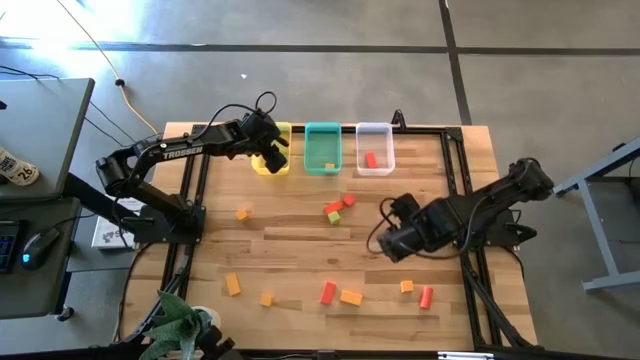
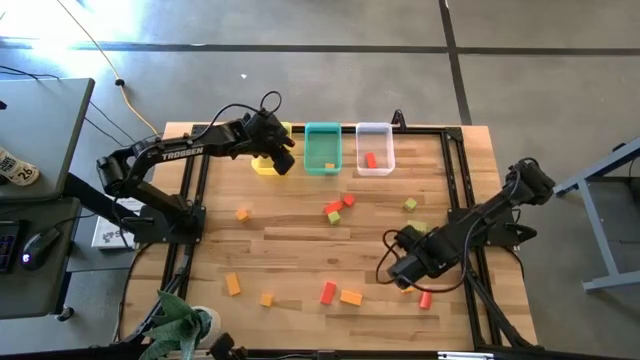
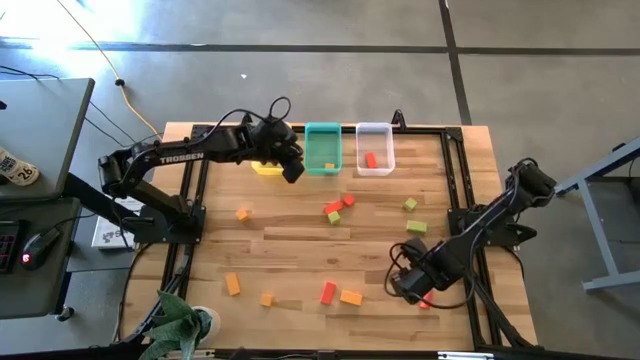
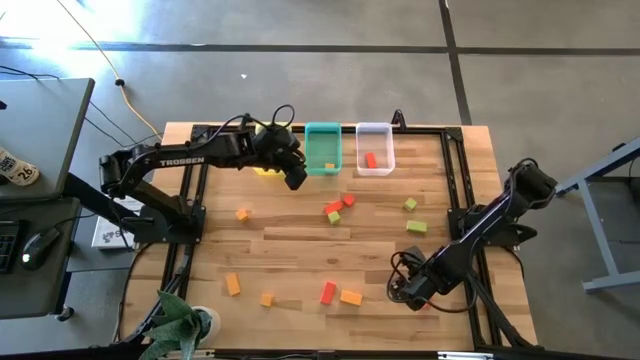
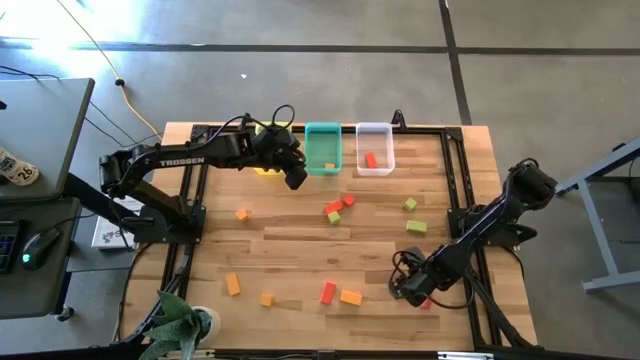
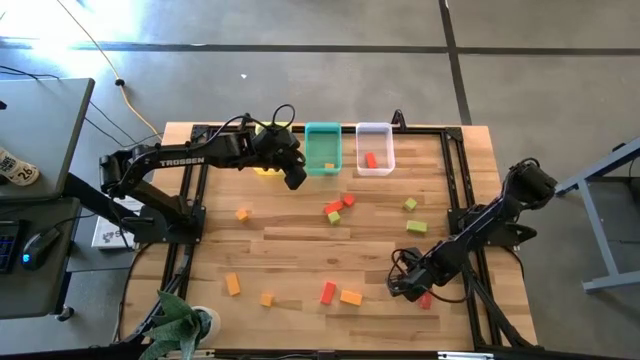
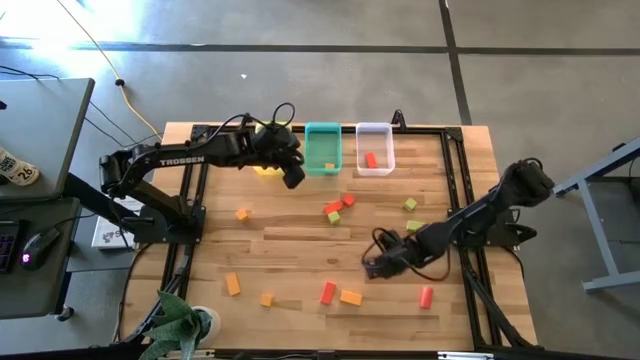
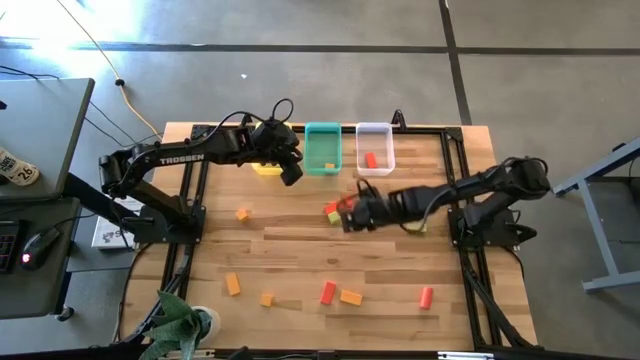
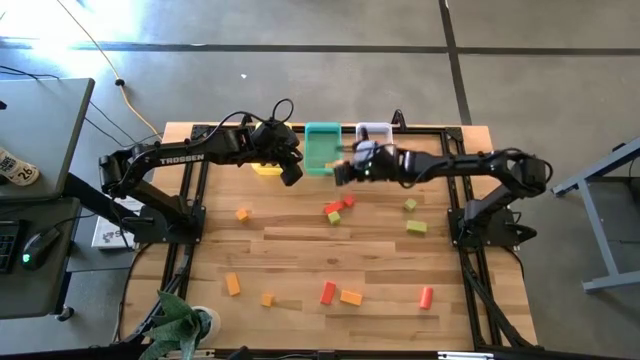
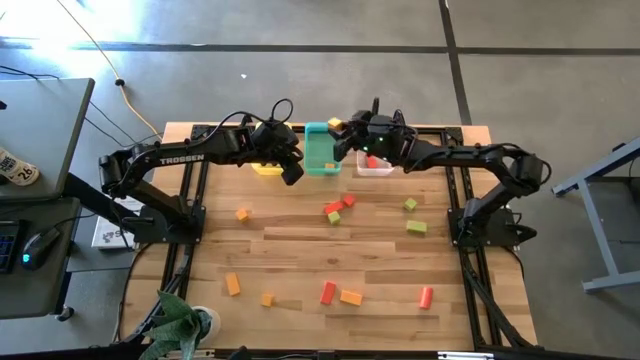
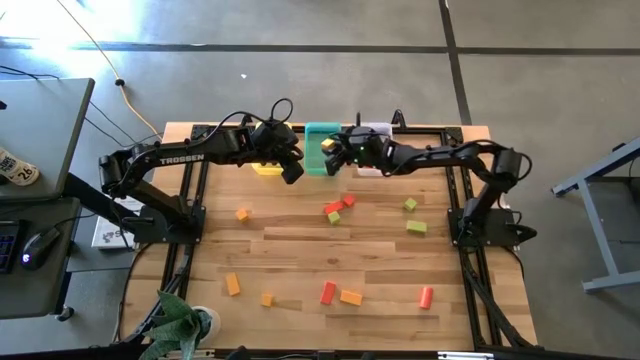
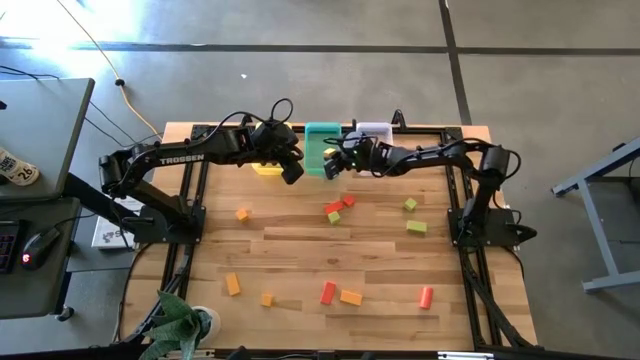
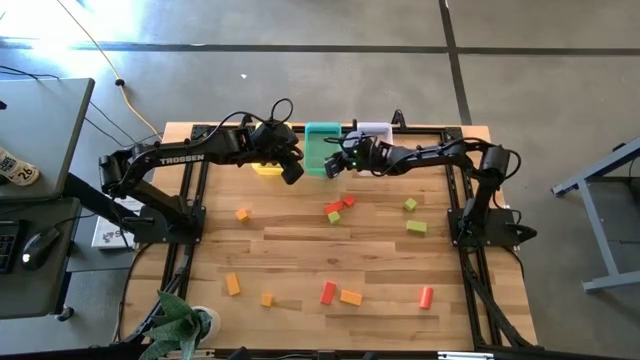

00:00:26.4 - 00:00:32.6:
Task: Sort & place blocks by color
Put the yellow block into the blue bin

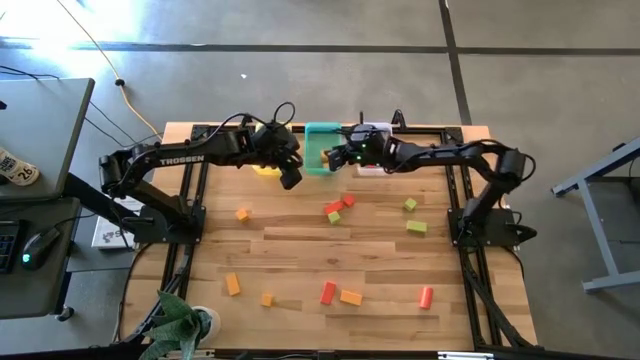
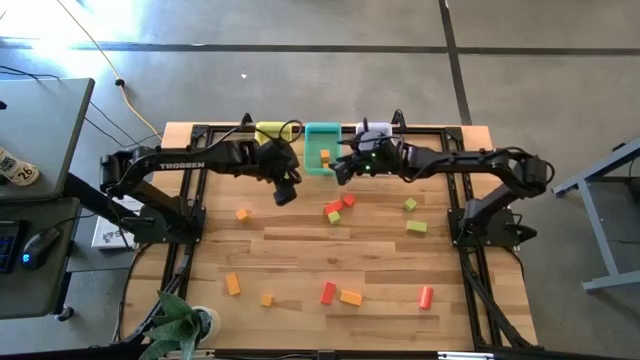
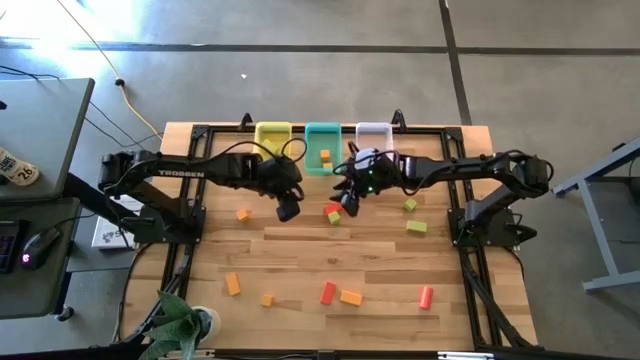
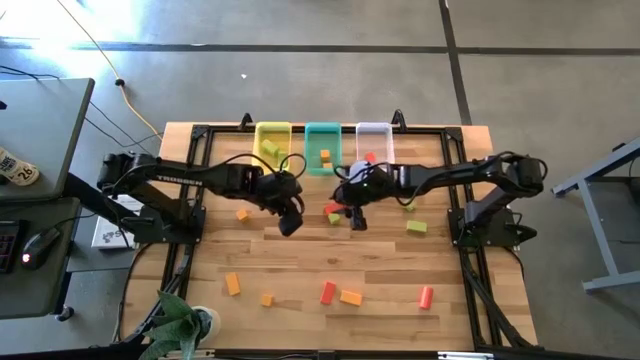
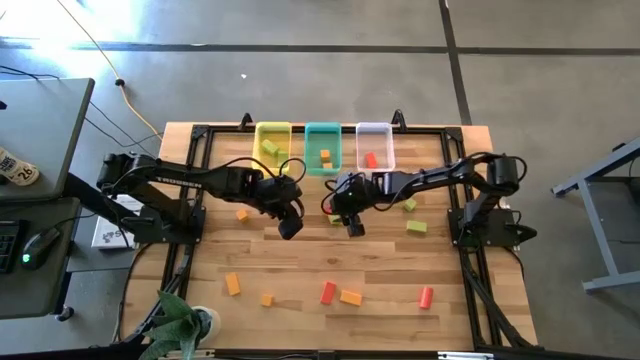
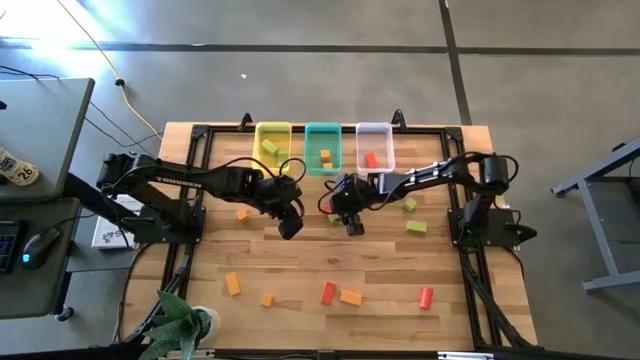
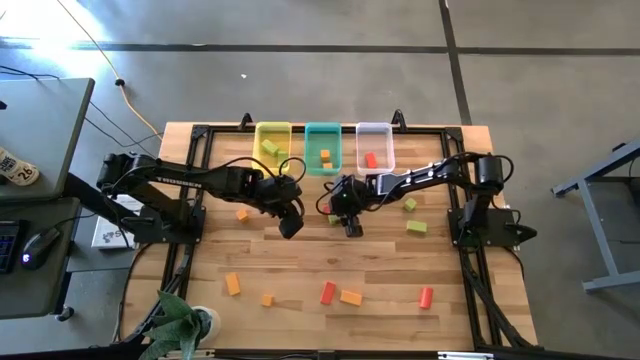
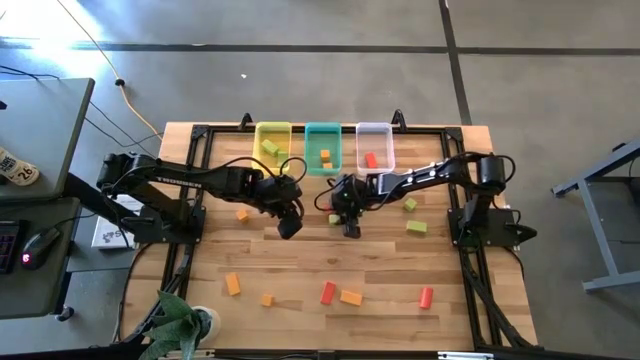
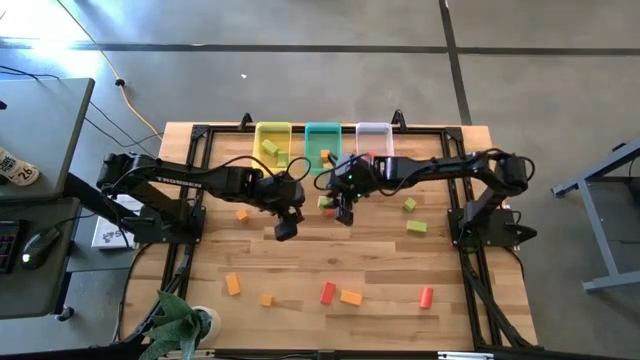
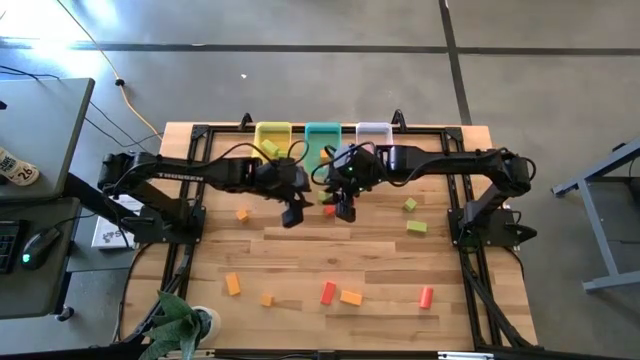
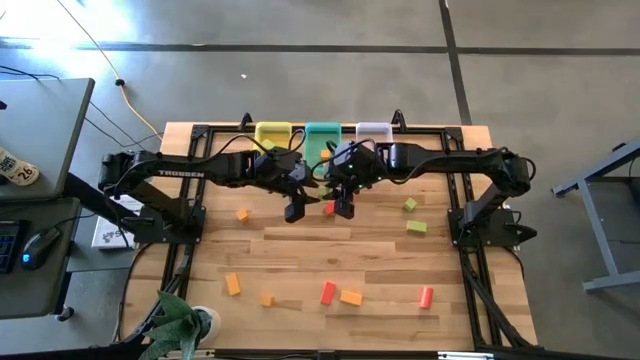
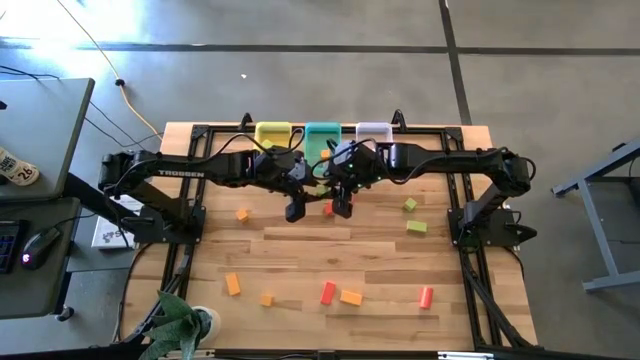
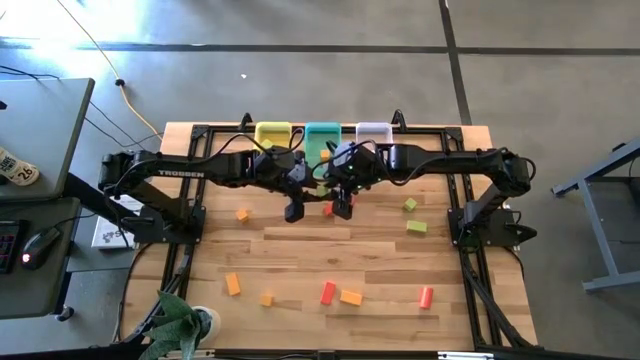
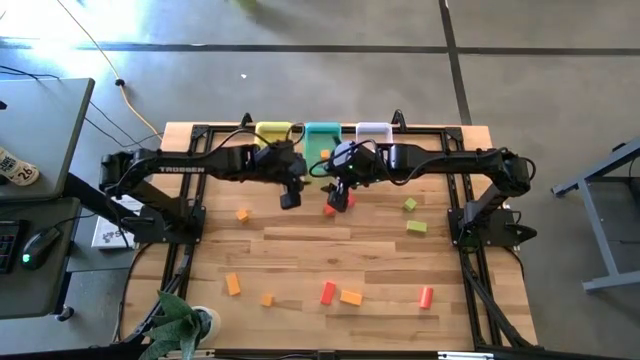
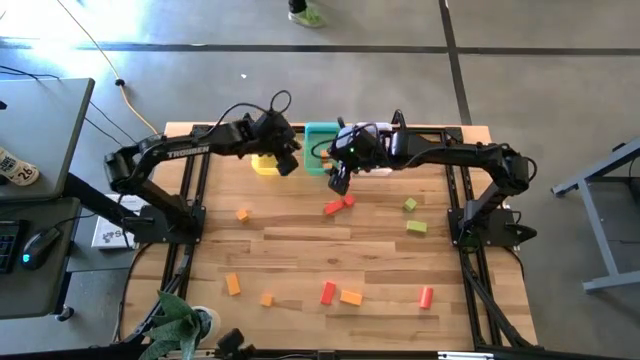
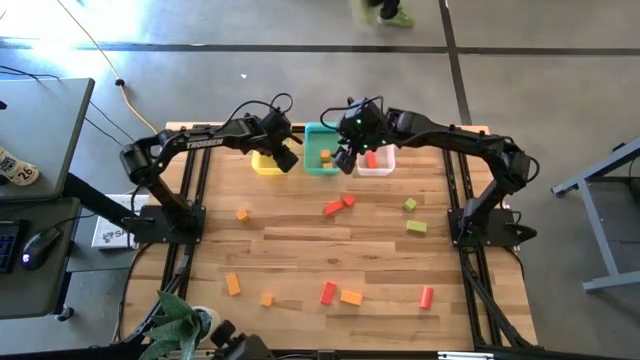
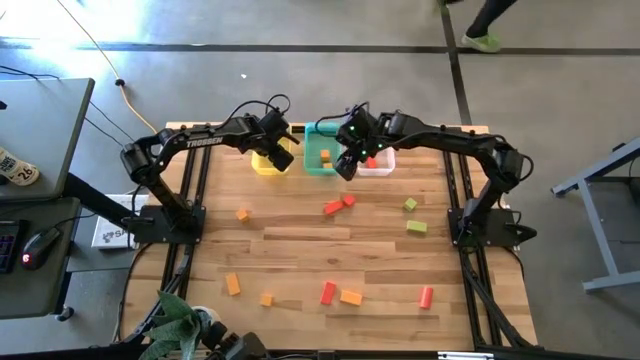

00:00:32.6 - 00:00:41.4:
Put the green block into the yellow bin

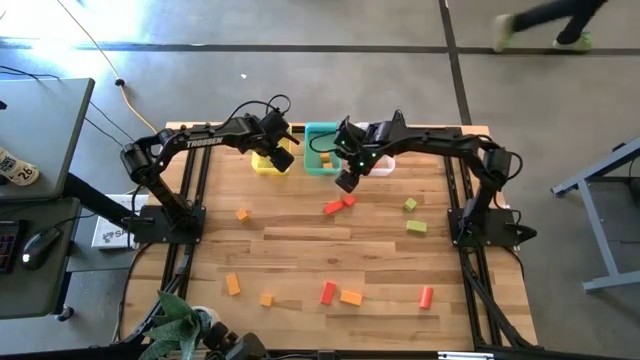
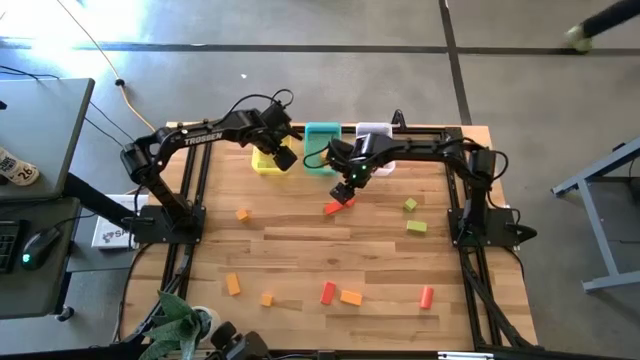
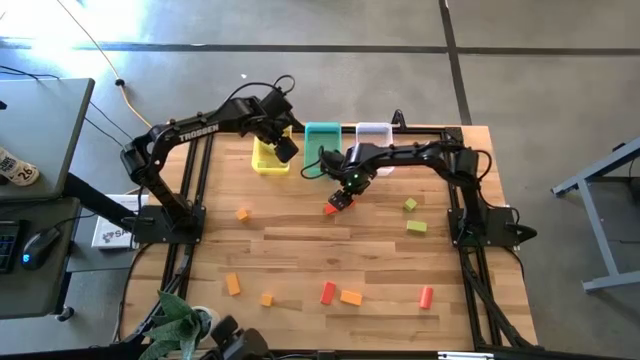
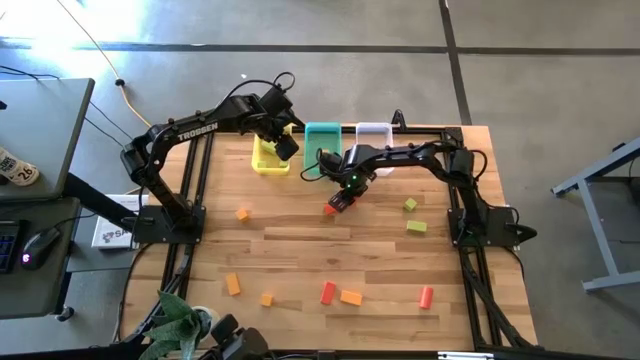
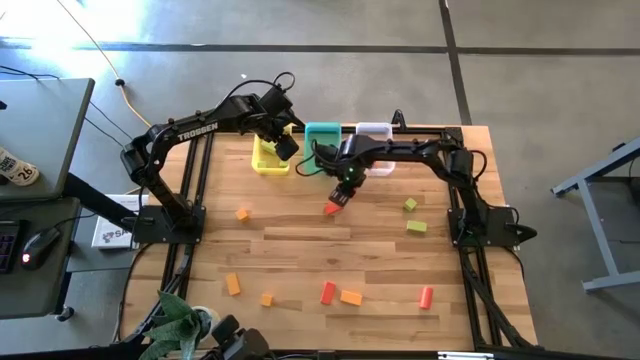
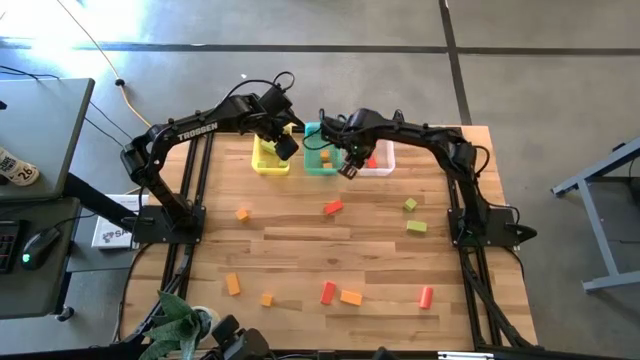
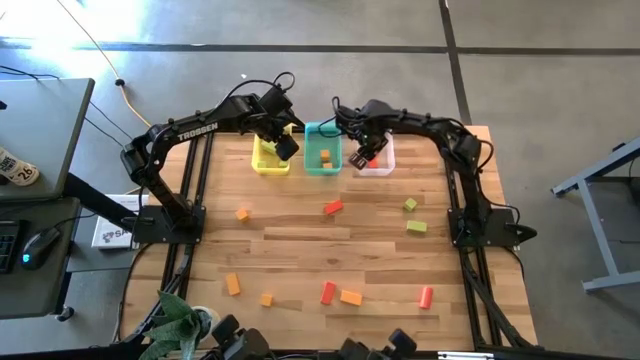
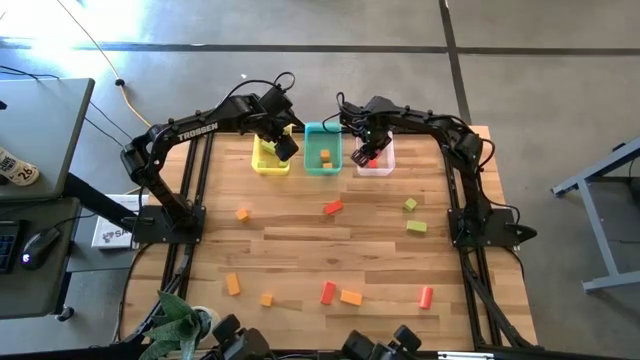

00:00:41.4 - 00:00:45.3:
Put the orange block into the white bin

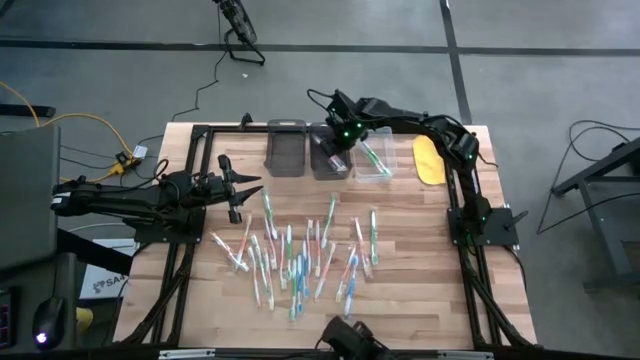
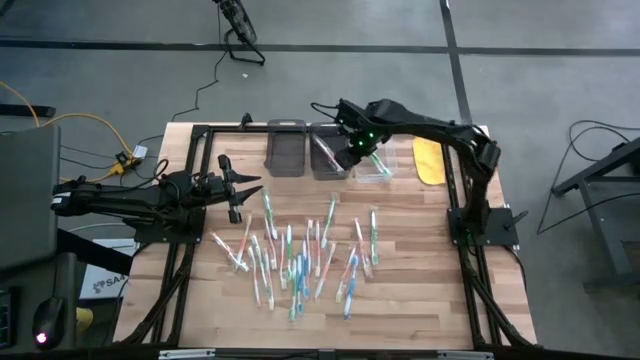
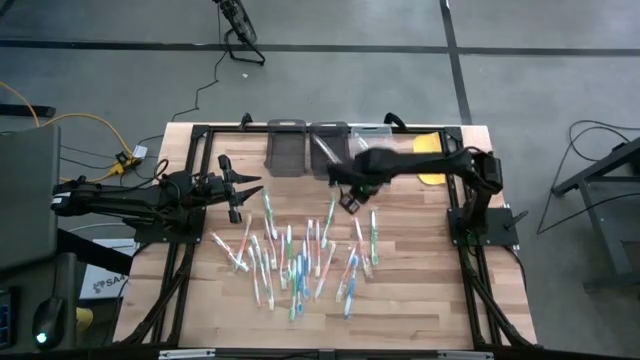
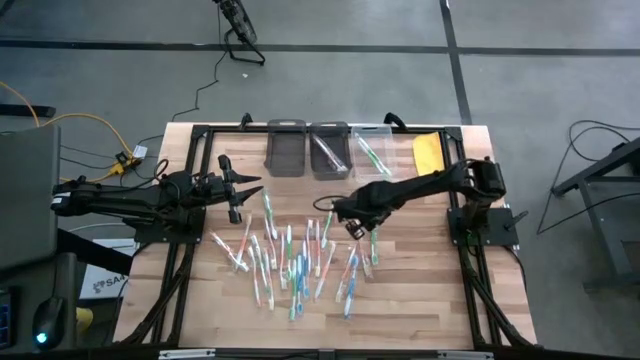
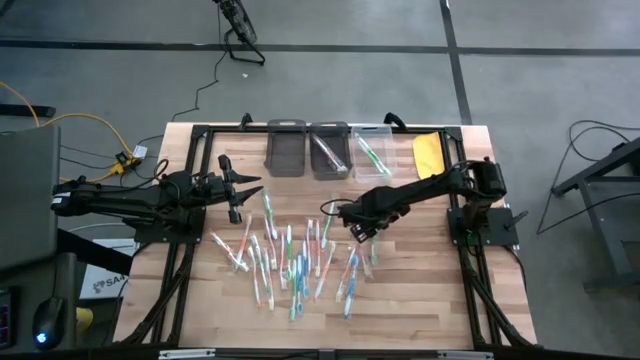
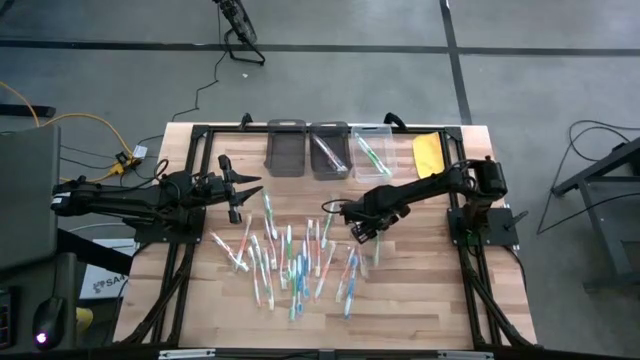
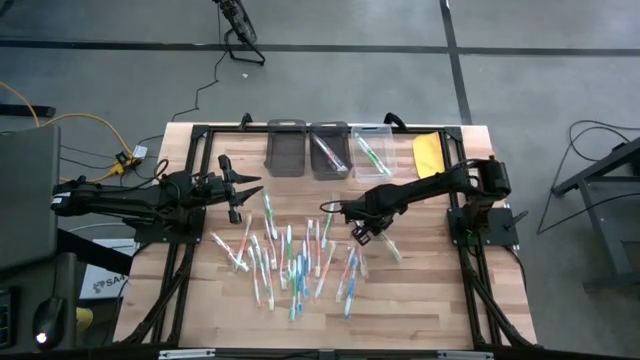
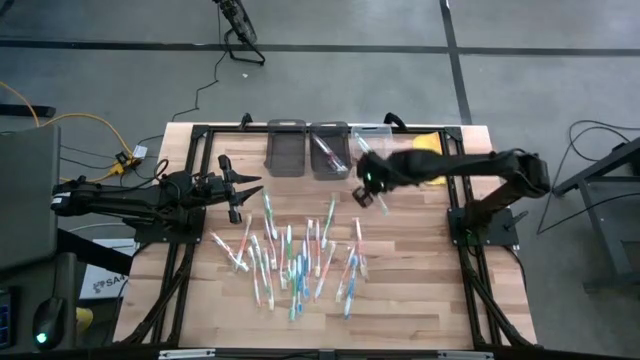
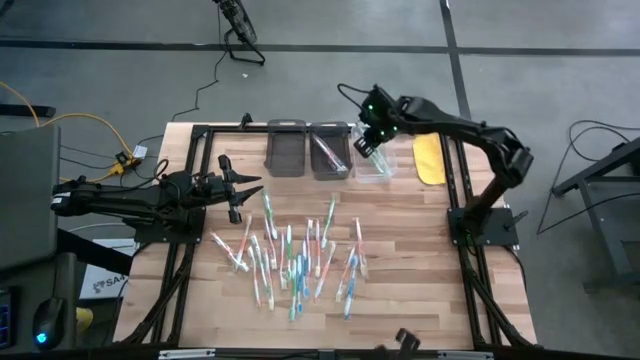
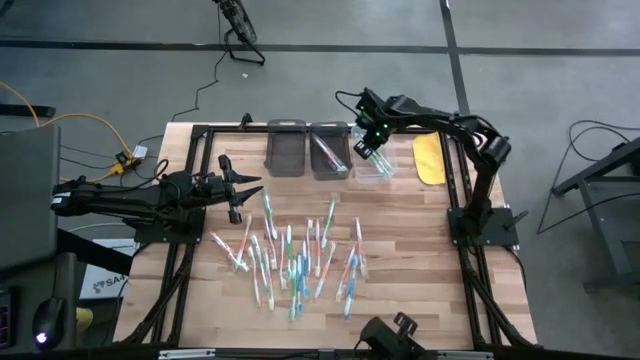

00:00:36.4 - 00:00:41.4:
Task: Pick & Place Toothbrushes
Put the green toothbrush into the transparent bin
